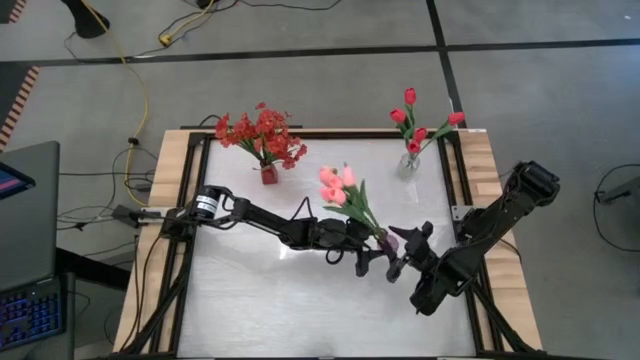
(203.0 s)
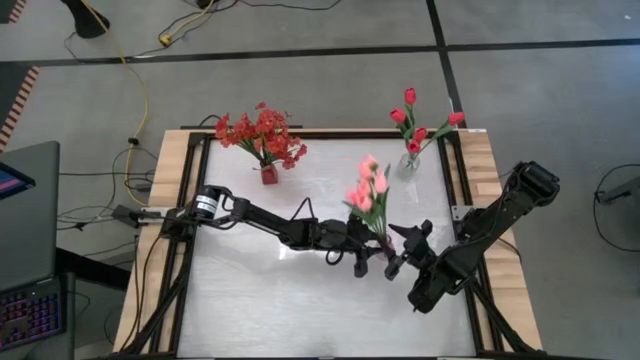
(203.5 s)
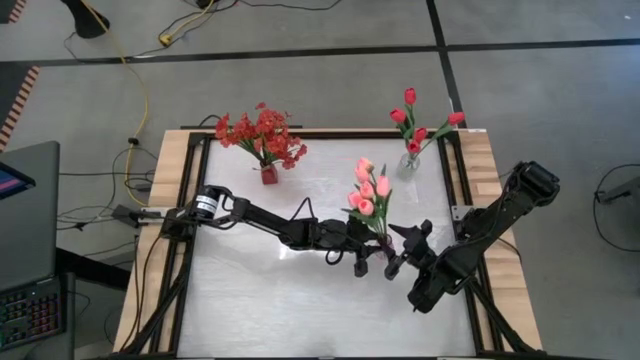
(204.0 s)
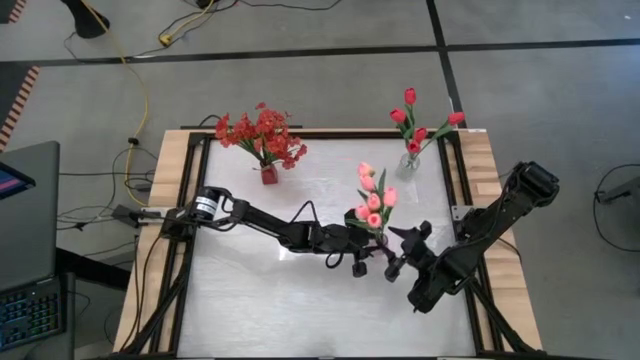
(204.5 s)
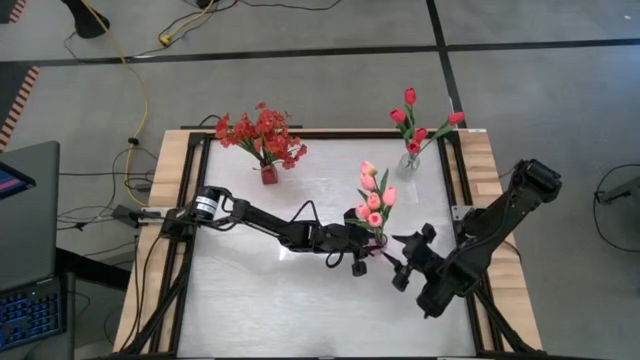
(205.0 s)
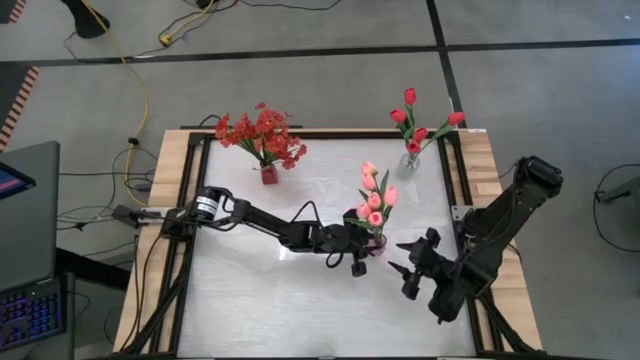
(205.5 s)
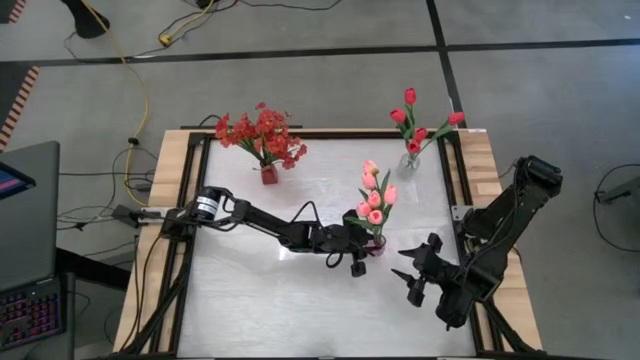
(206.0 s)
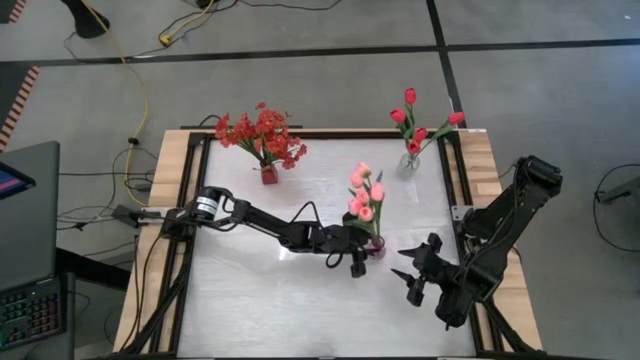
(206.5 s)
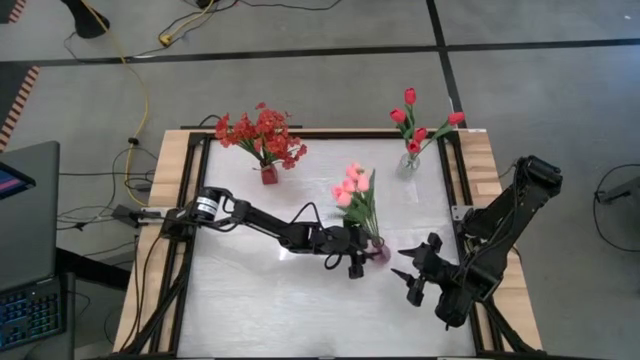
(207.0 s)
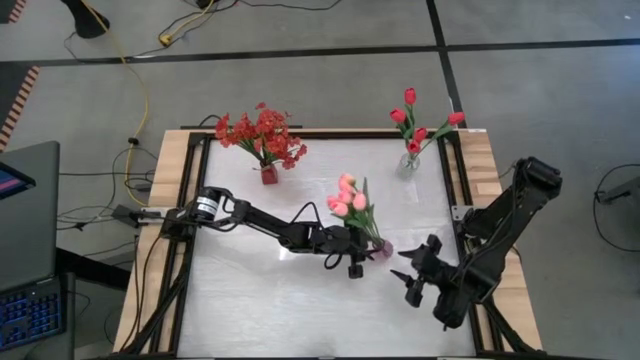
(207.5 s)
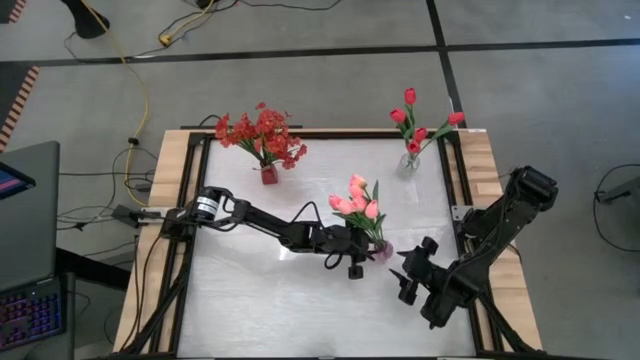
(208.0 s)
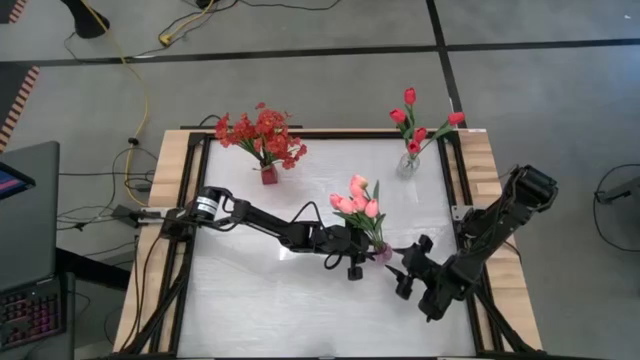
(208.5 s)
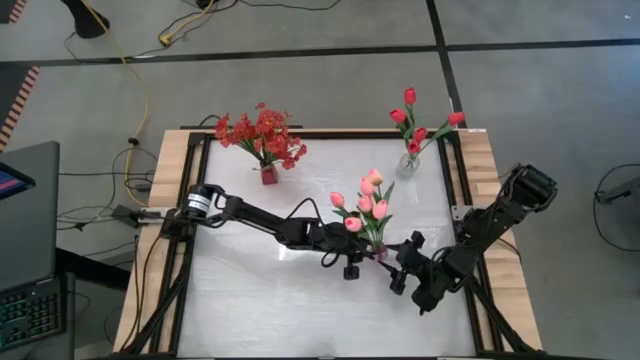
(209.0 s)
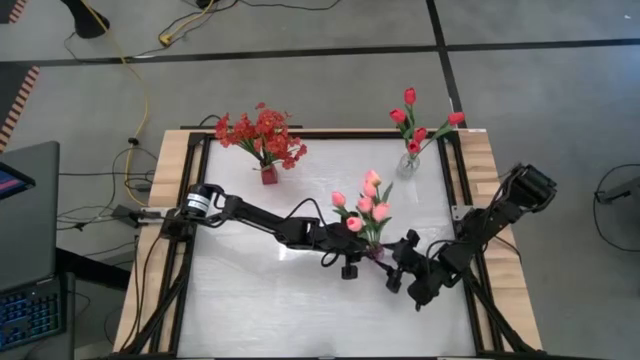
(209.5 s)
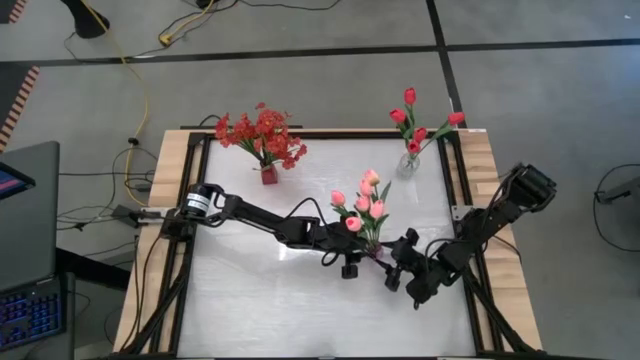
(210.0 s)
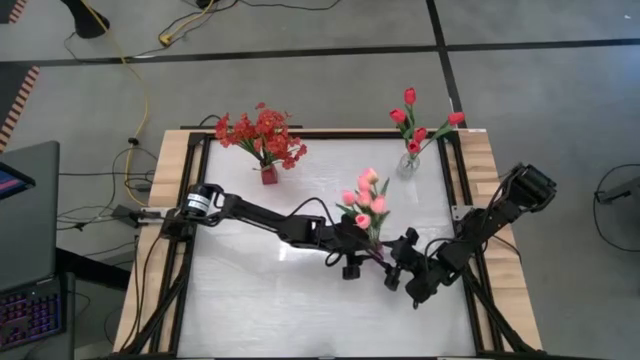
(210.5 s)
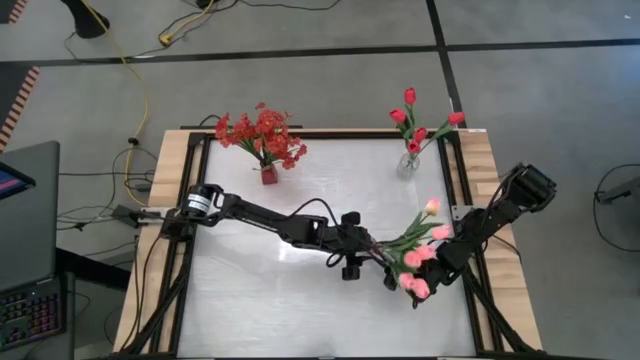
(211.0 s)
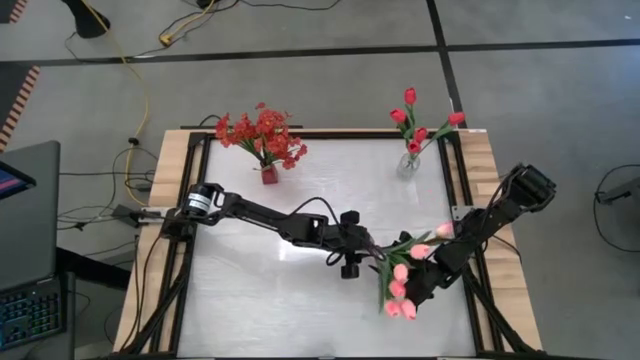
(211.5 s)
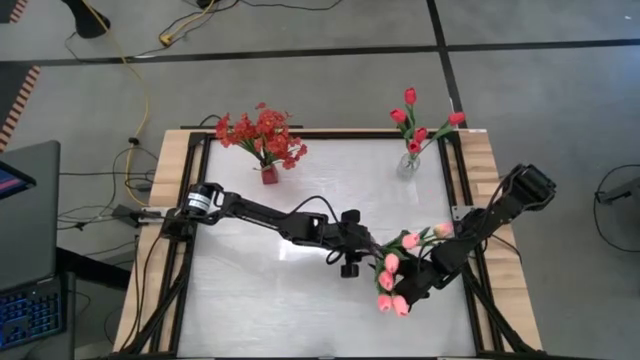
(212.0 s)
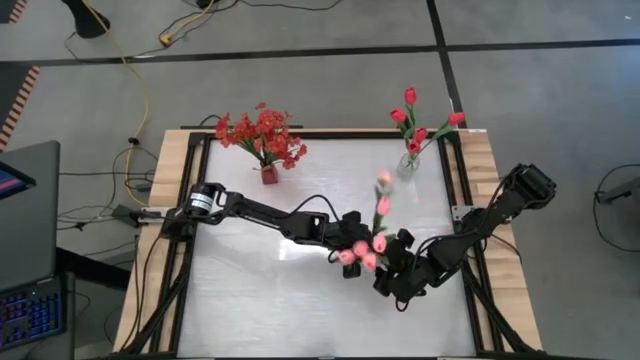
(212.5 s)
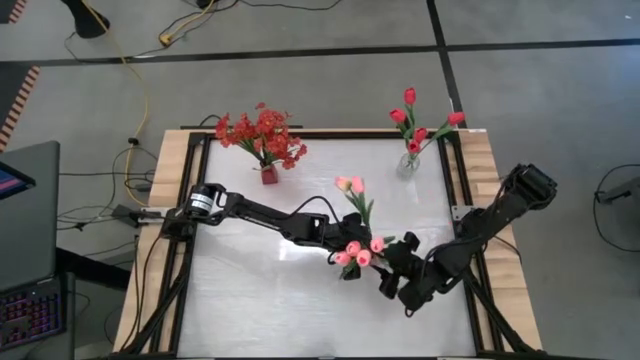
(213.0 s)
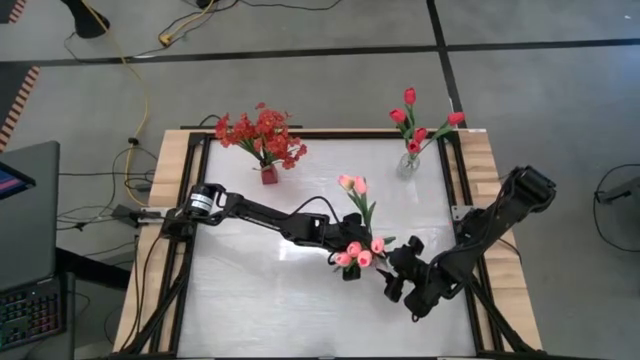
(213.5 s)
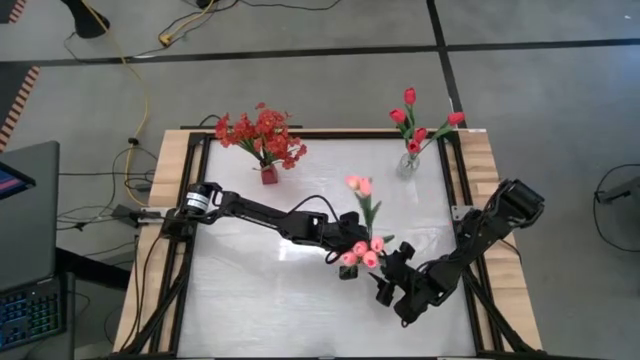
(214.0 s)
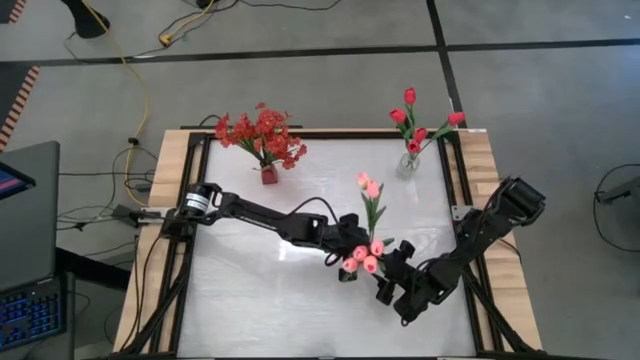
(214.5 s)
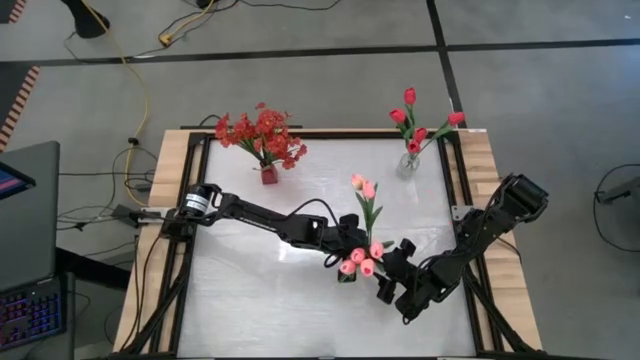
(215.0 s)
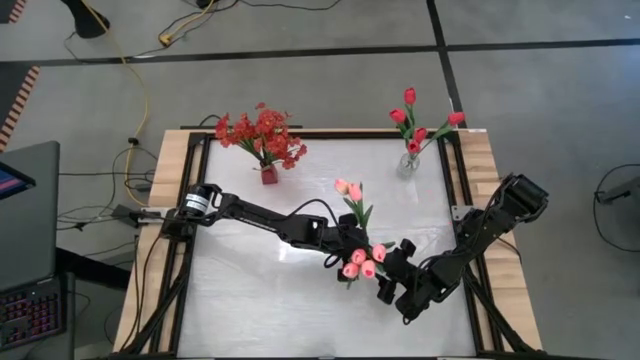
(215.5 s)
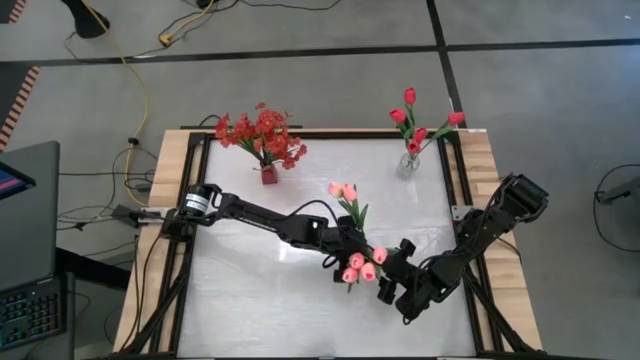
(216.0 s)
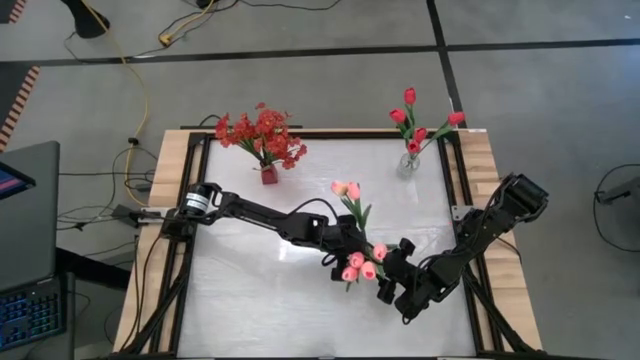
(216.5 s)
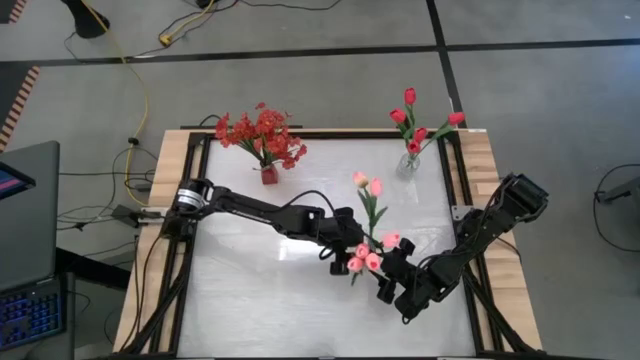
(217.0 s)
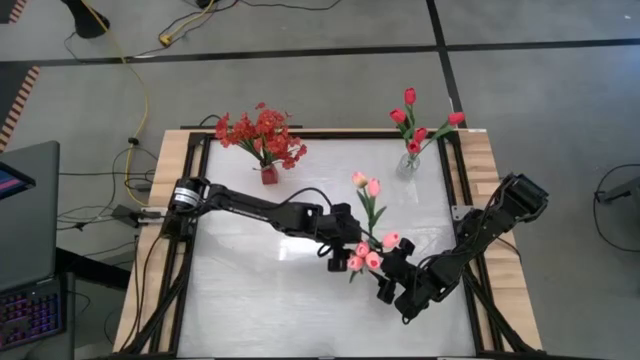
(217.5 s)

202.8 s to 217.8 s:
Task: Sort flowers into vase by color
Adjust the pink tulips in the purple flower vase

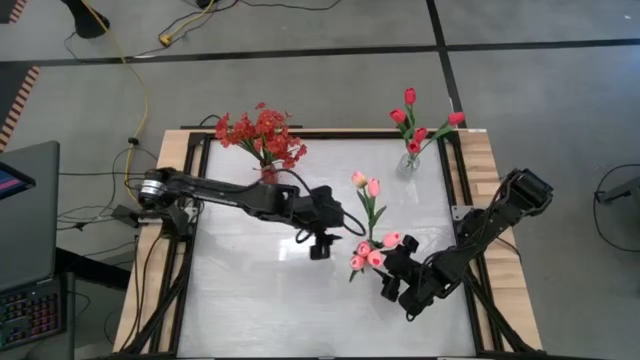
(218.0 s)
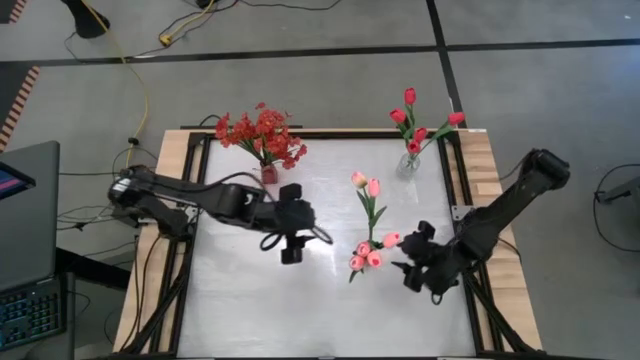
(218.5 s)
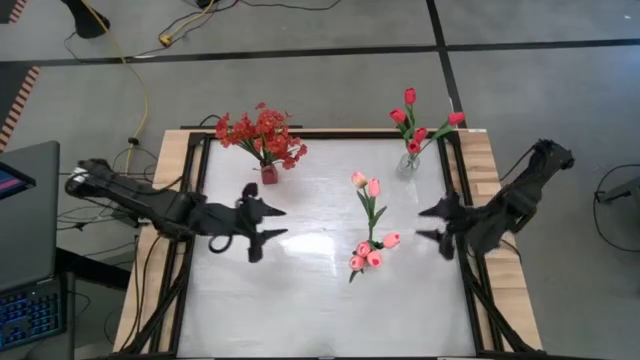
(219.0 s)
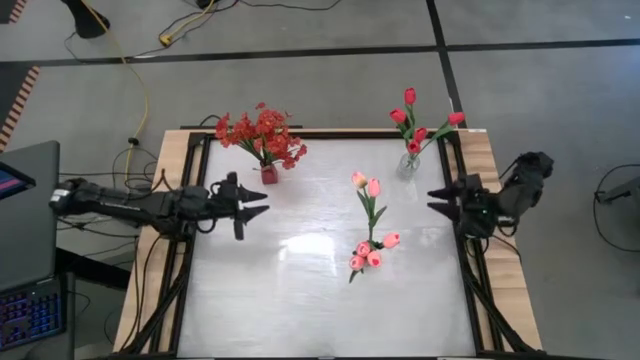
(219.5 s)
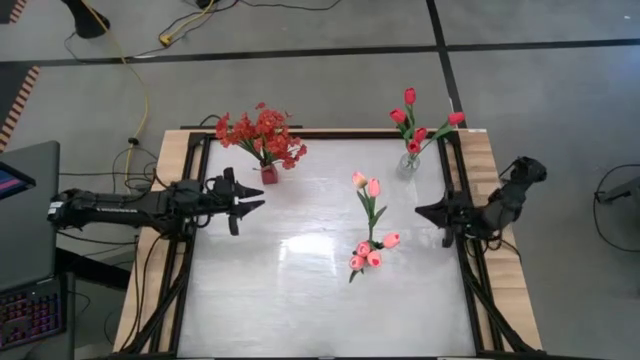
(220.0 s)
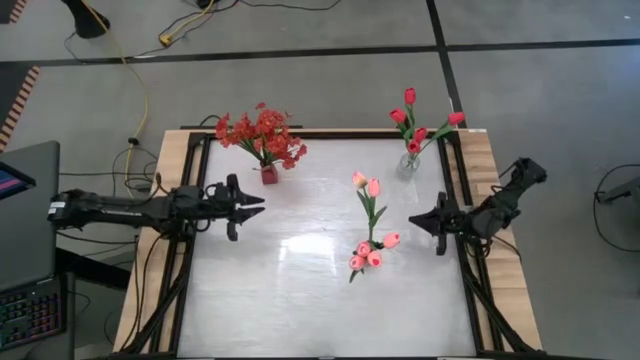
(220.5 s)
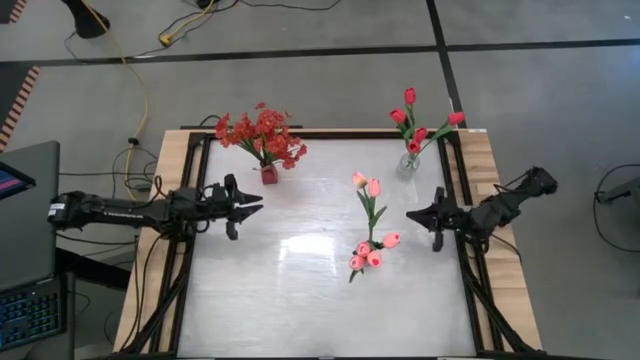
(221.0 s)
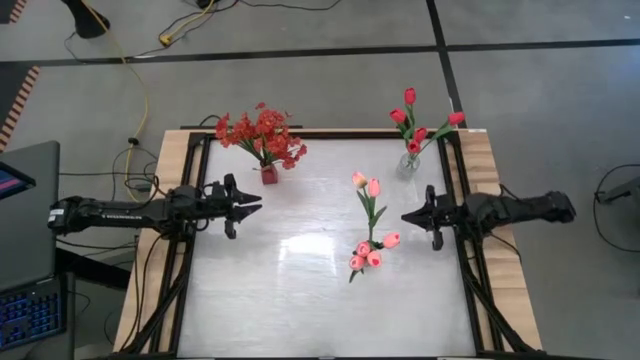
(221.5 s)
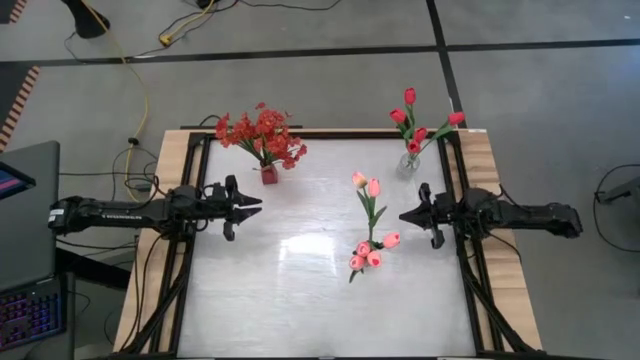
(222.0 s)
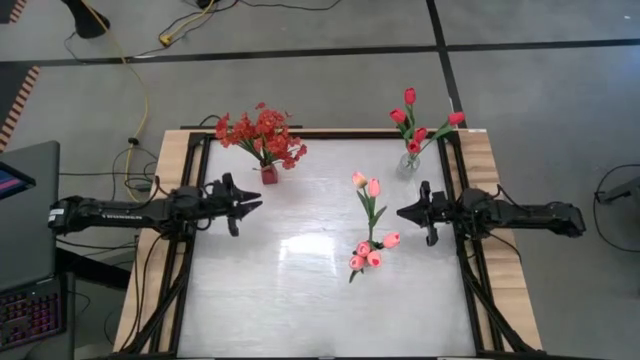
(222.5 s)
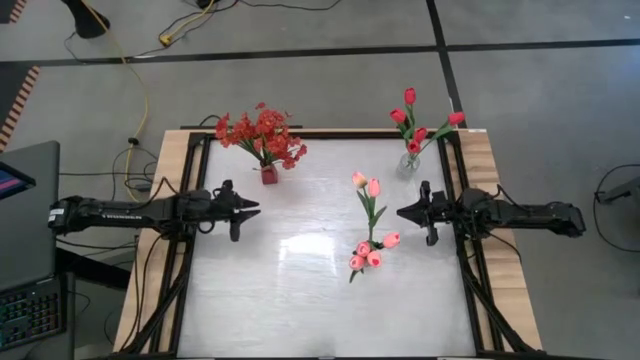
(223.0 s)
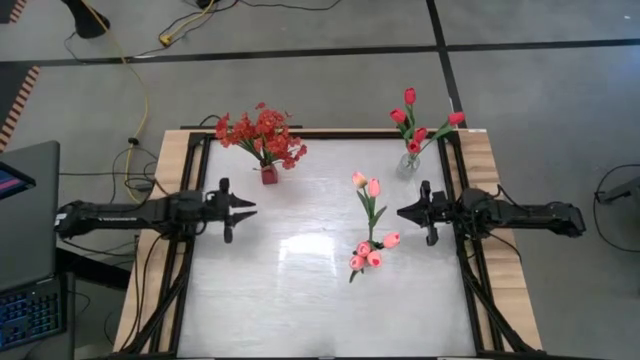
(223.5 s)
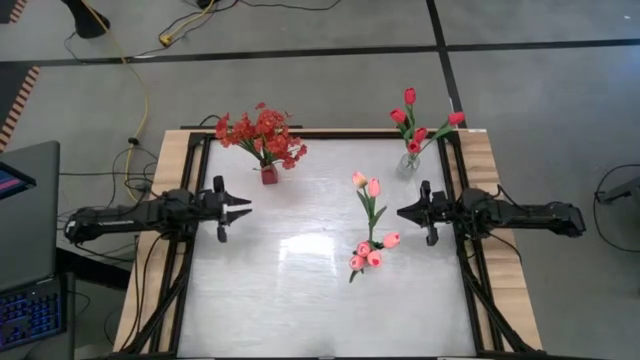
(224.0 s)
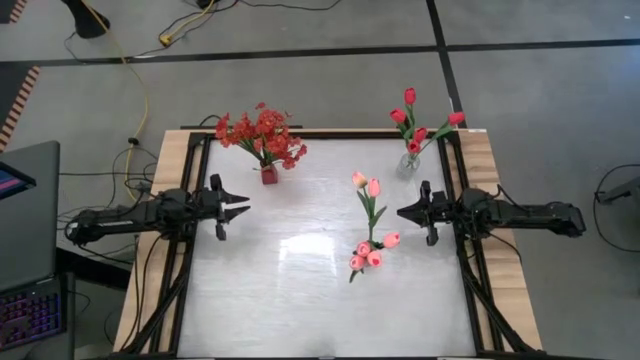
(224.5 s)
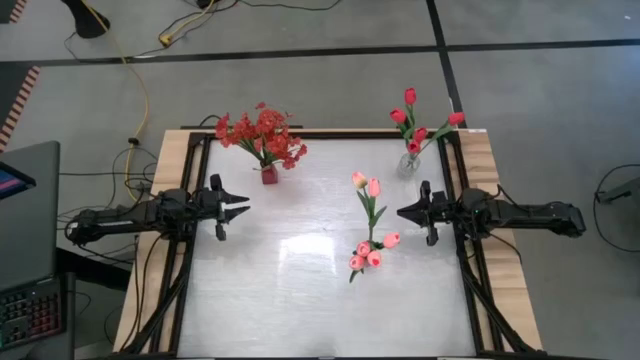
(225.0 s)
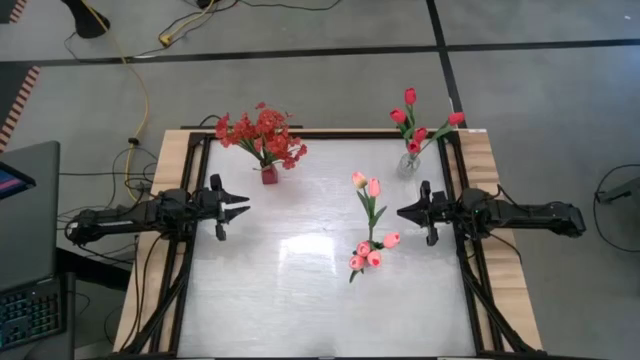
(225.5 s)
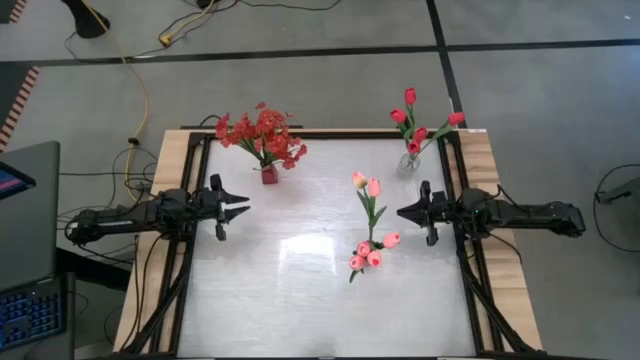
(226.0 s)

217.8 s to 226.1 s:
Return to Home Position
